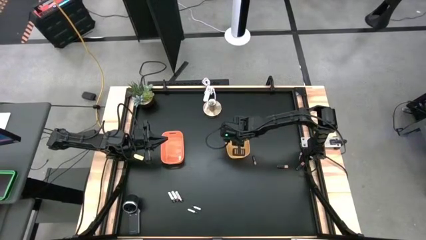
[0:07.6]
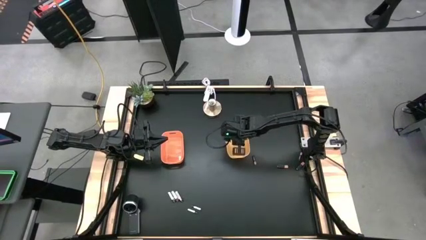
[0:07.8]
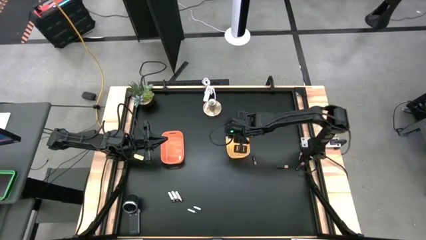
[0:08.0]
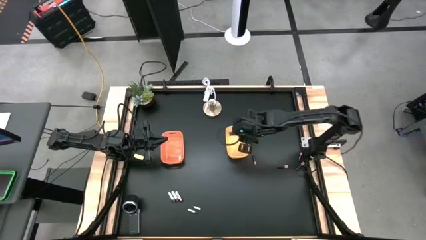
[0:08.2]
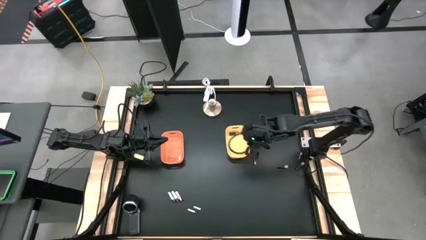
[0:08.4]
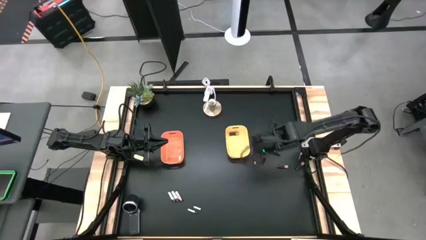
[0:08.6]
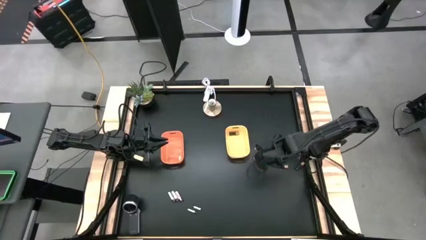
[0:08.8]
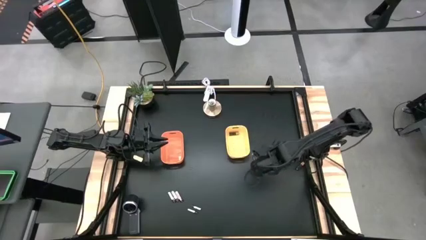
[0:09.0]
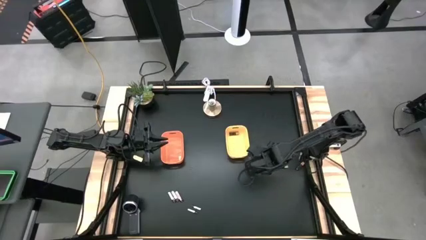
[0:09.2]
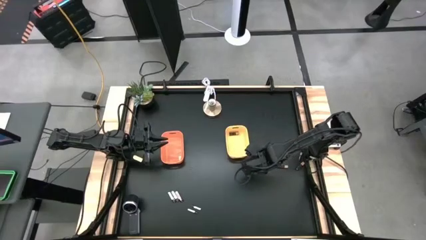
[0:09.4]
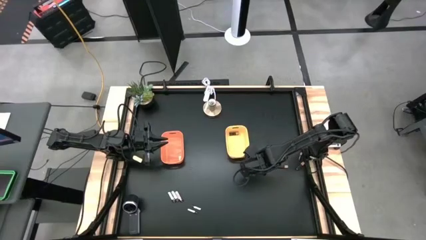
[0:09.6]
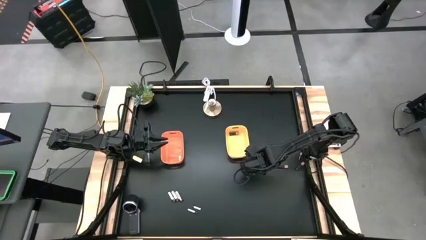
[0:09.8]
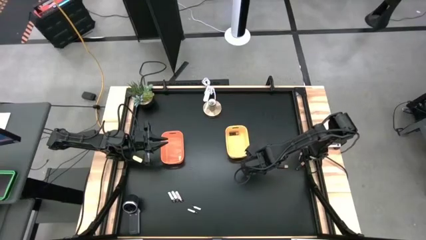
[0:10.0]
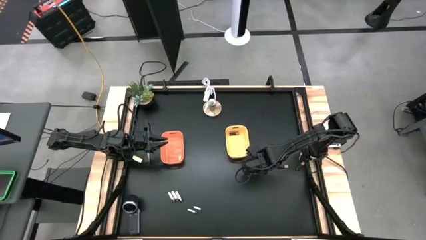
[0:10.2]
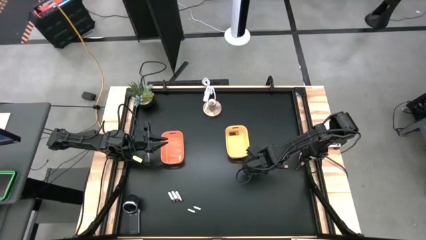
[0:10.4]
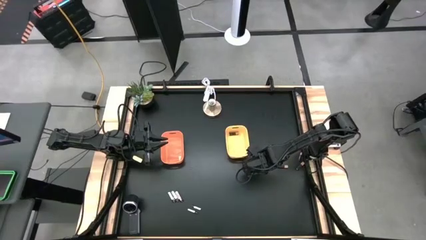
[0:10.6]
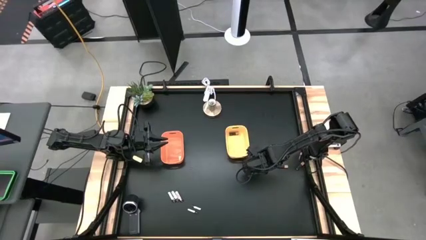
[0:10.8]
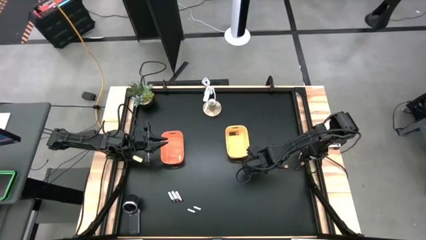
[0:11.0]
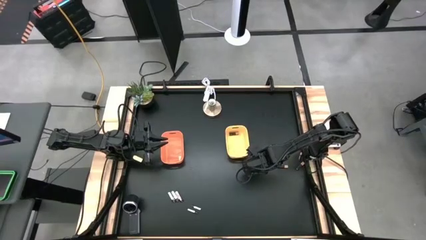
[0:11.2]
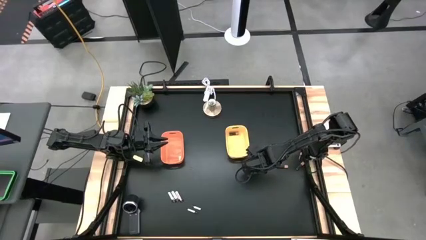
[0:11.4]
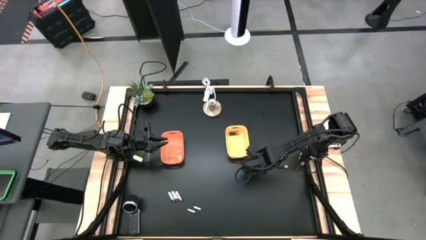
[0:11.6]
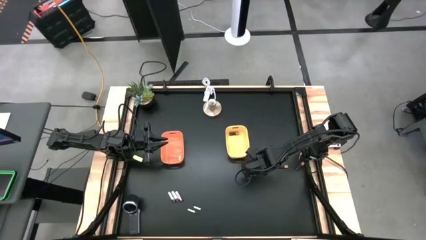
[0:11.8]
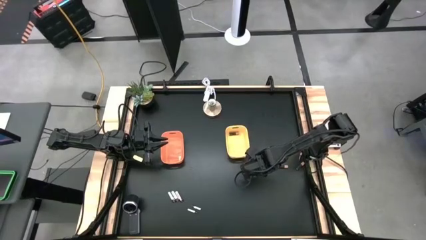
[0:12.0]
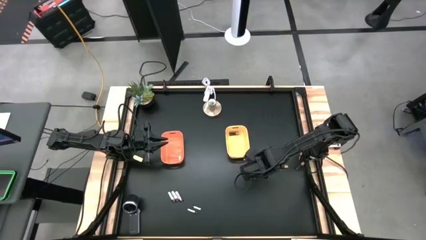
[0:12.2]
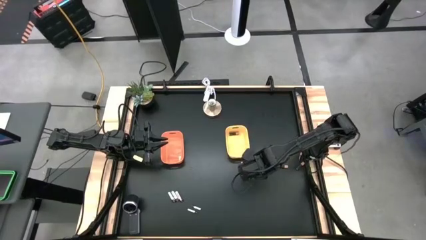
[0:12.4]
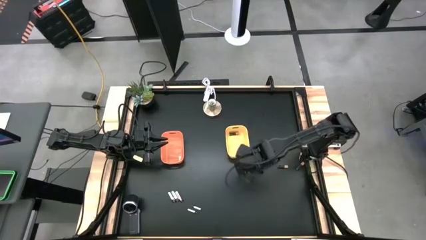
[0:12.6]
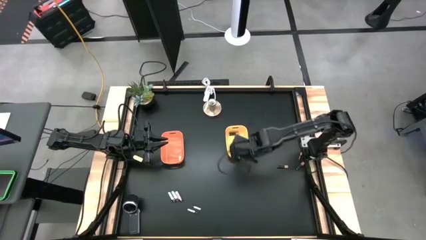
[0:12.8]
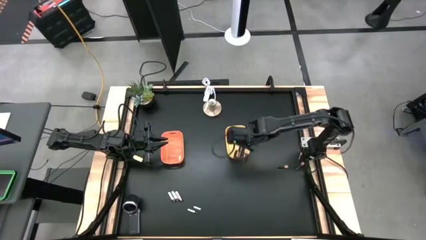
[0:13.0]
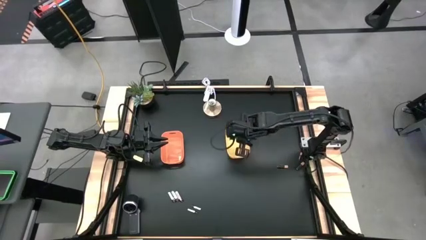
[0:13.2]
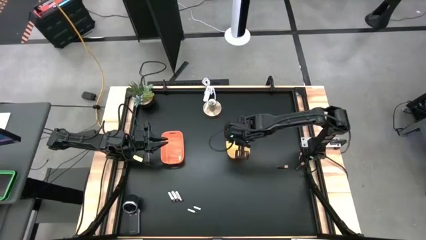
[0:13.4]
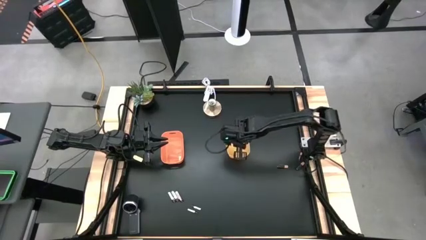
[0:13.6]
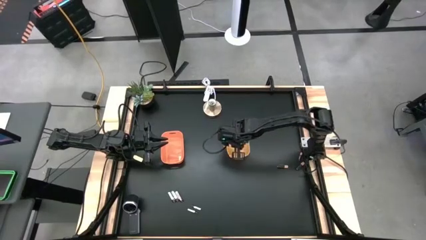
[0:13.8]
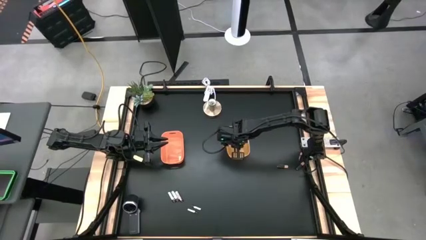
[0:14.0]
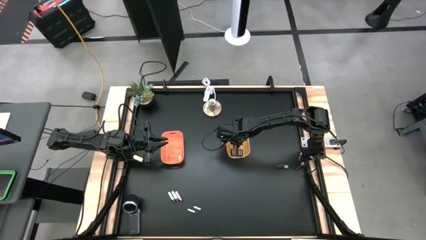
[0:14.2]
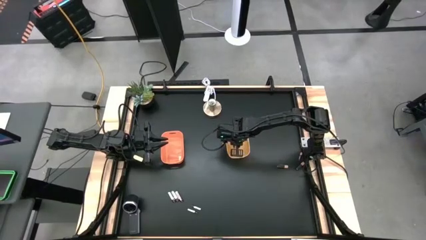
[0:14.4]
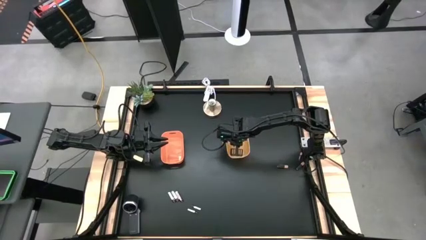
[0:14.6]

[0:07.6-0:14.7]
Task: Sort batteries
Put the black battery into the yellow bin

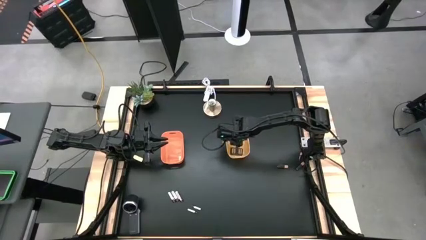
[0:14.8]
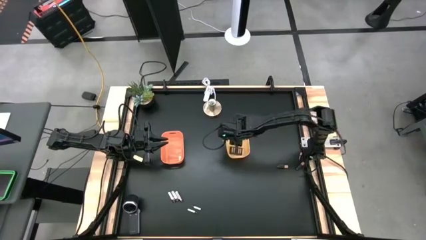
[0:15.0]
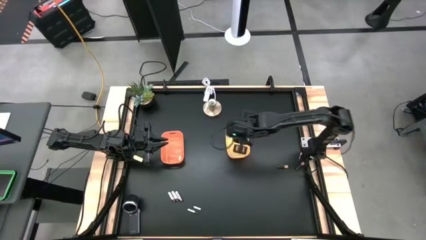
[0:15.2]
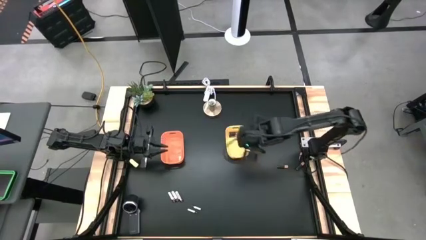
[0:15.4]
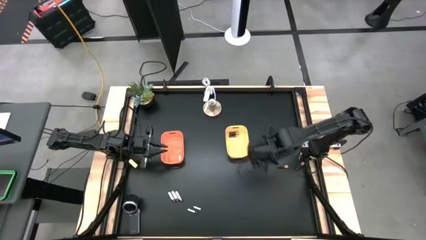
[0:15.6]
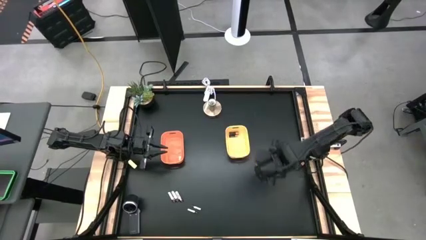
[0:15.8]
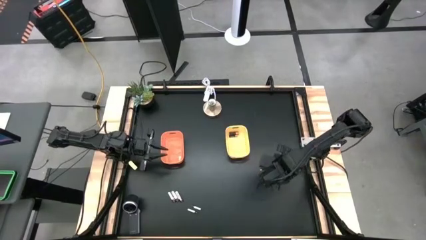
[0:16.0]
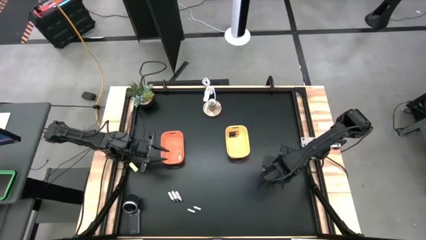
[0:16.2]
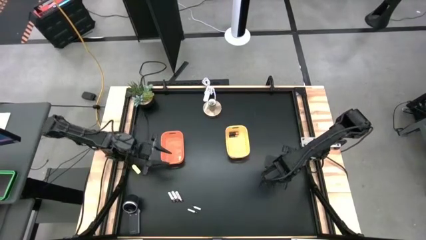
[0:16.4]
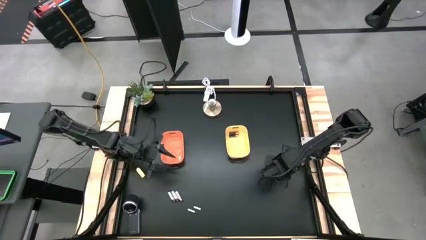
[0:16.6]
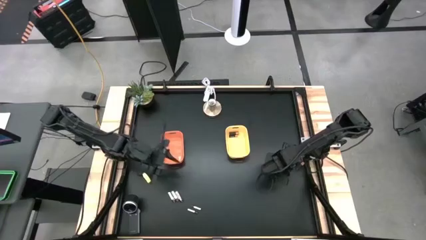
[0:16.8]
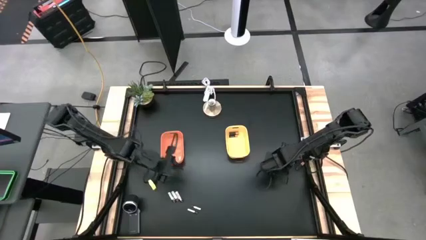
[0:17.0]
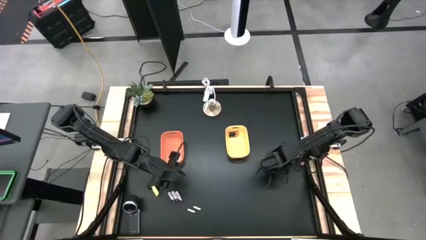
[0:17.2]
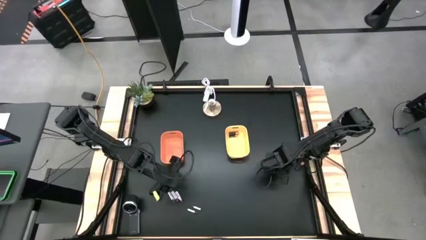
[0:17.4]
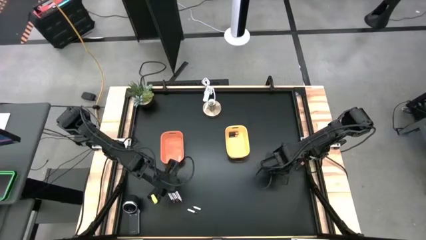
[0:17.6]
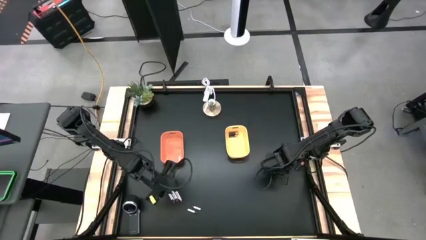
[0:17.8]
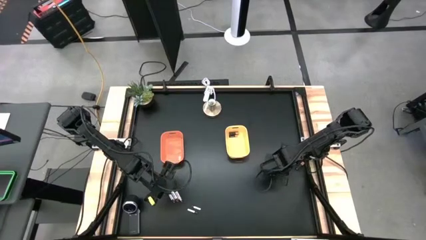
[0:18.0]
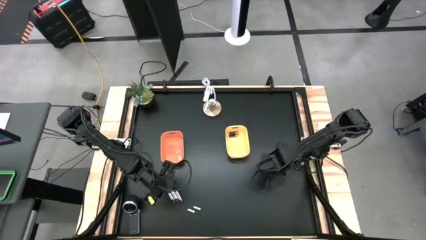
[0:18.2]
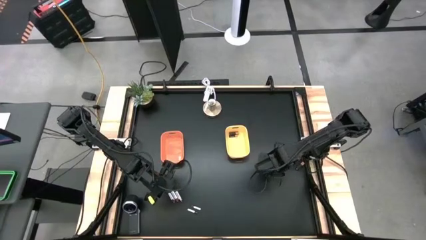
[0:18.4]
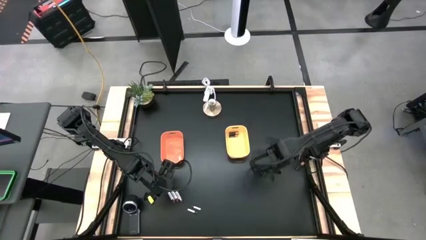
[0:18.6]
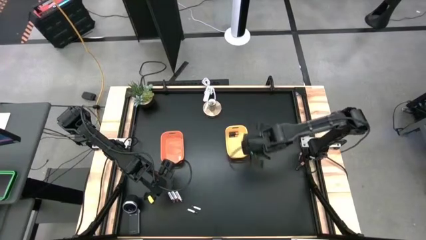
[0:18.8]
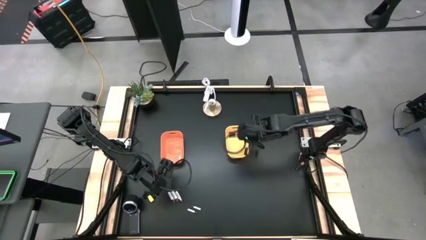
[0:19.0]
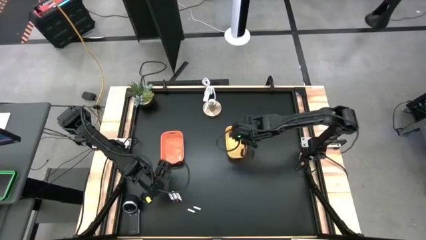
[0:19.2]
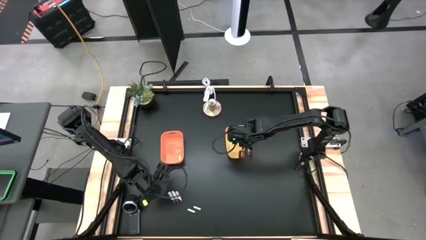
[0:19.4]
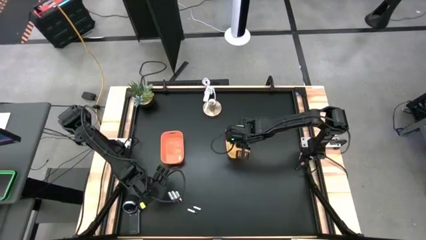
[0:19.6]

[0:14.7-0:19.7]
Put the black battery into the yellow bin

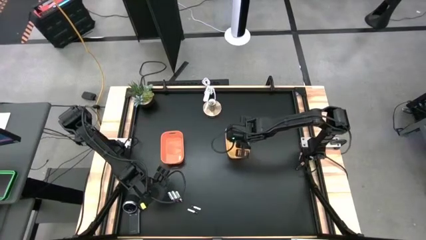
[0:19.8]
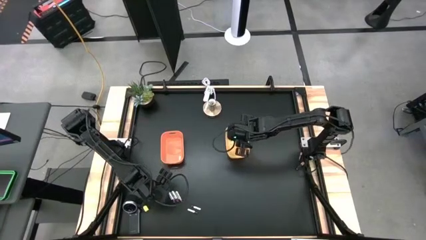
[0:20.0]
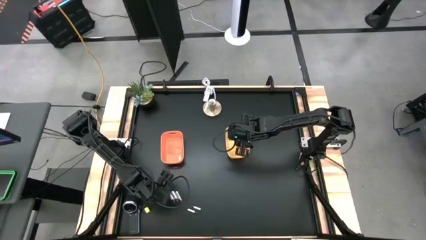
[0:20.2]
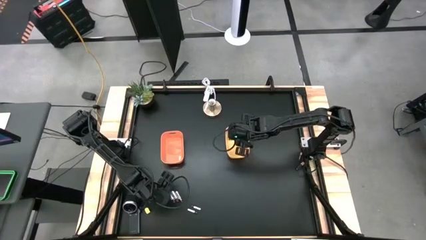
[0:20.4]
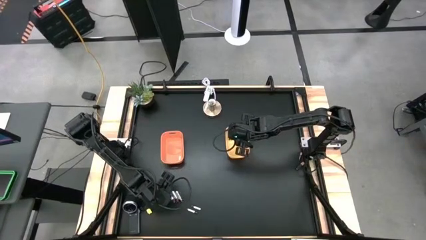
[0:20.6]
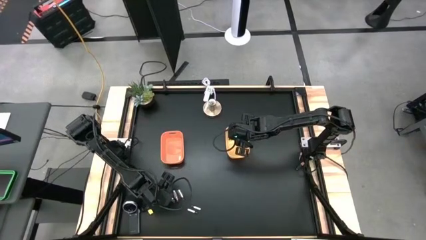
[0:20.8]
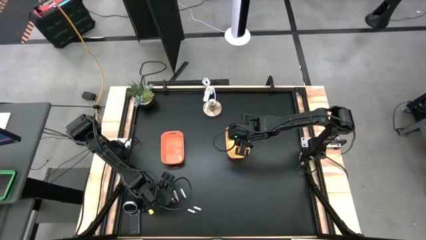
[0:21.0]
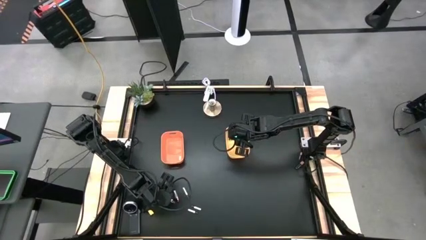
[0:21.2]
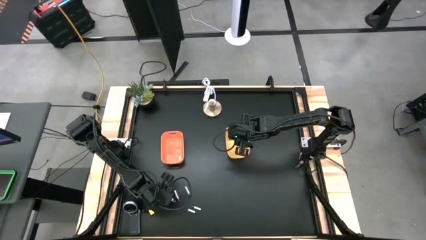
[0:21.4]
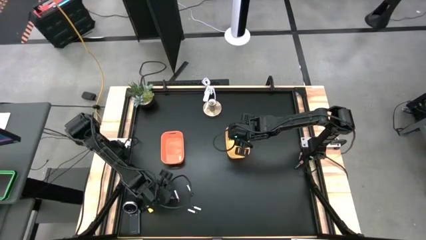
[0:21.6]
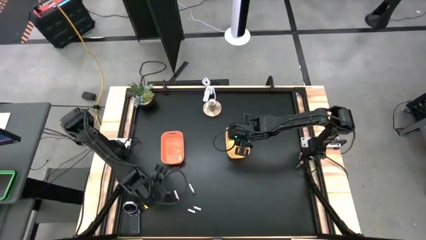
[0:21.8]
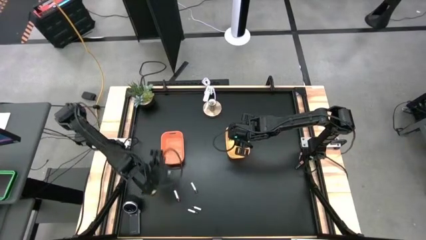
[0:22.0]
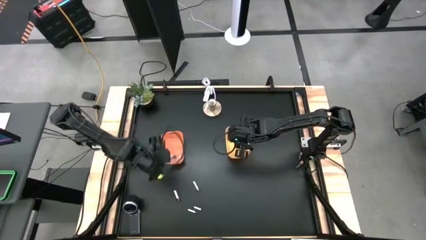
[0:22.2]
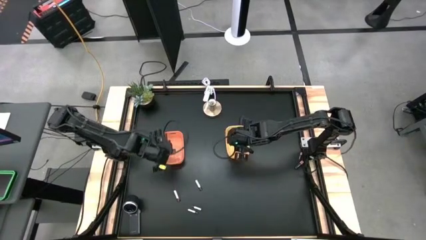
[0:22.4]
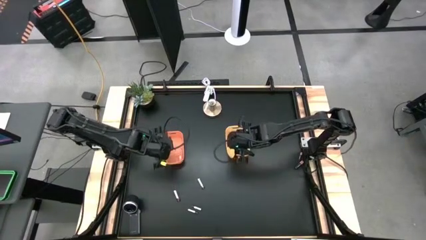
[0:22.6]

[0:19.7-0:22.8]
Put the silver battery into the orange bin

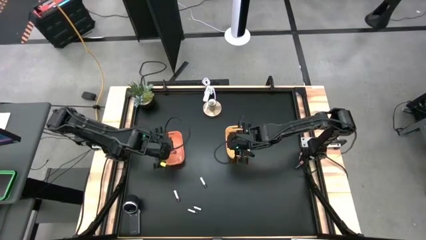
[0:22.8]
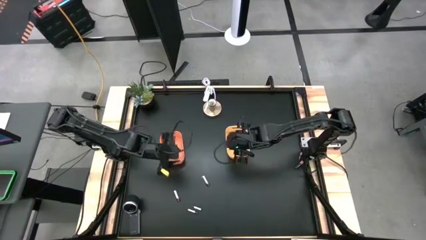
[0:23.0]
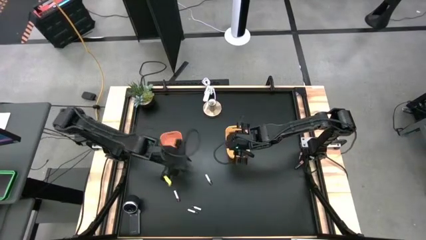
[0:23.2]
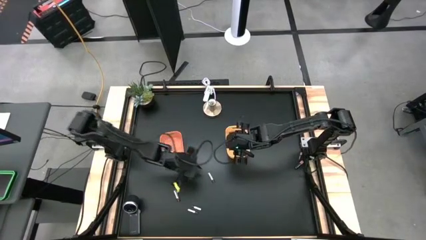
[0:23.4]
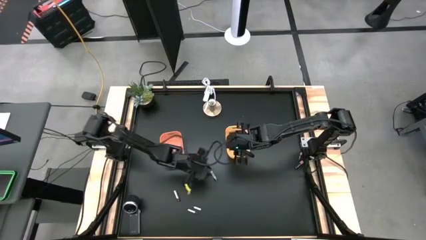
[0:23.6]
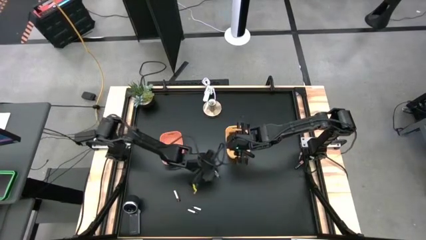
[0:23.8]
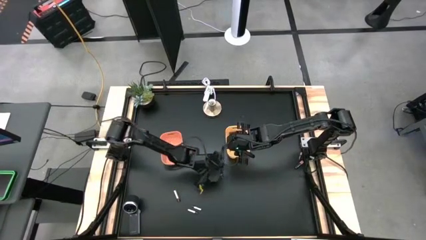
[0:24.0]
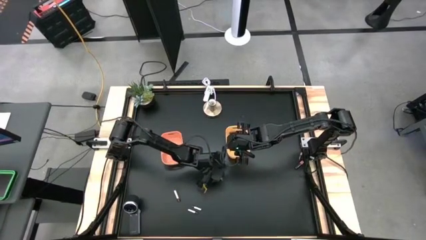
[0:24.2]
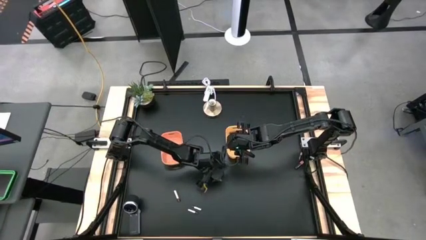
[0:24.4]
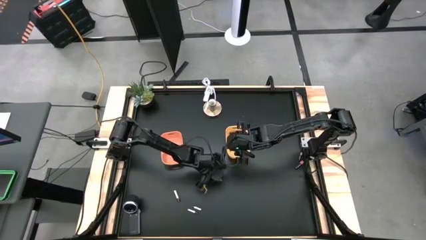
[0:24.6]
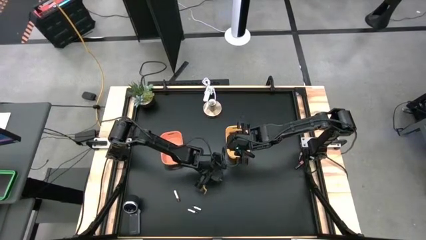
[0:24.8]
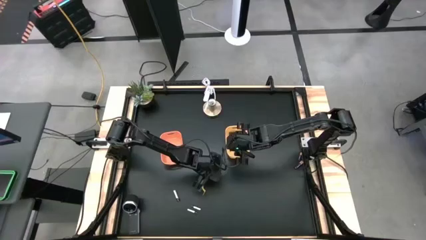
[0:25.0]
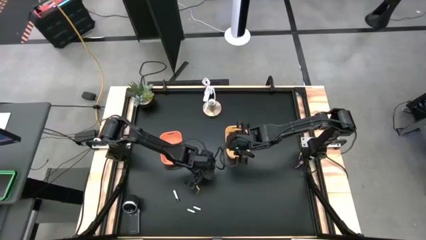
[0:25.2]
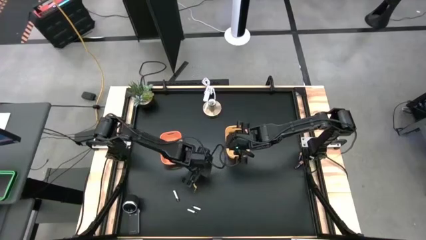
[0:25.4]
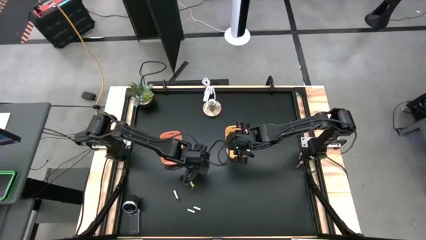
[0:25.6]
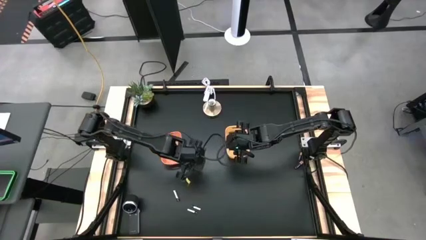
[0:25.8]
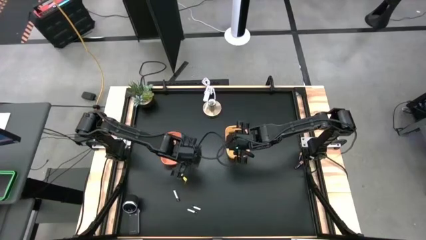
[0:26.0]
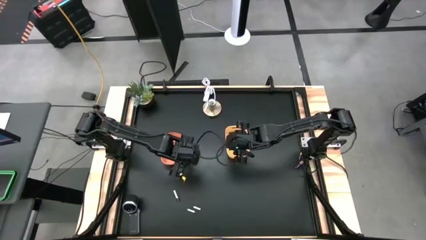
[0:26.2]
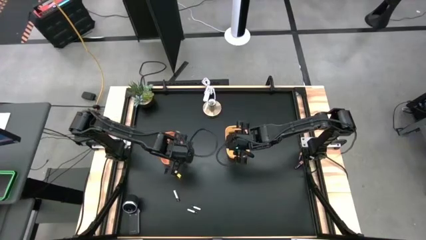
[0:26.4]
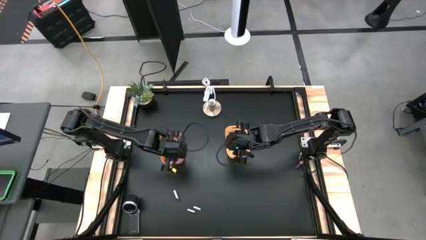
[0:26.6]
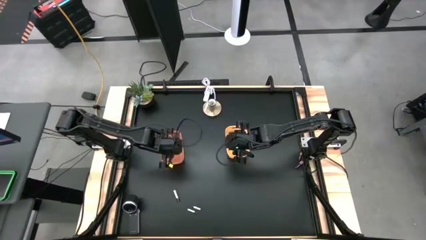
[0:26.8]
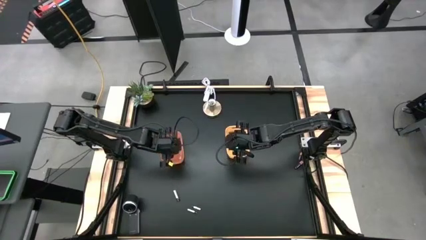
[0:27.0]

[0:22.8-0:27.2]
Put the silver battery into the orange bin
